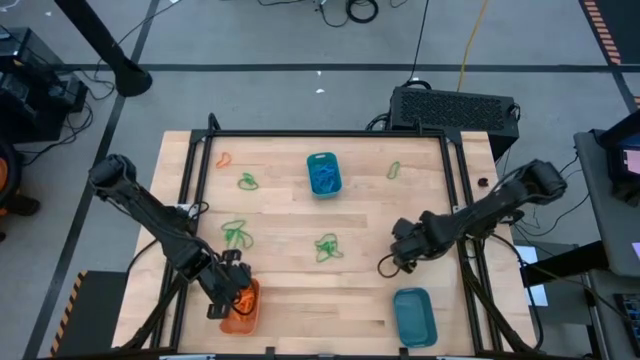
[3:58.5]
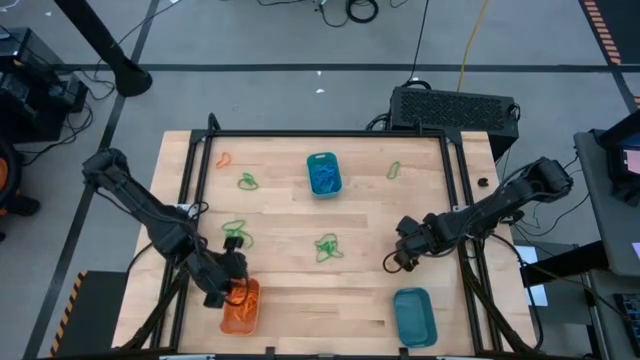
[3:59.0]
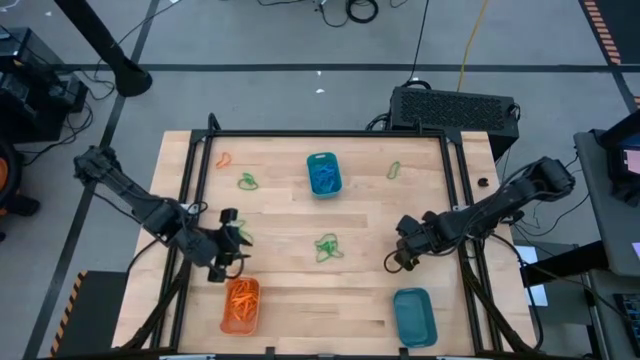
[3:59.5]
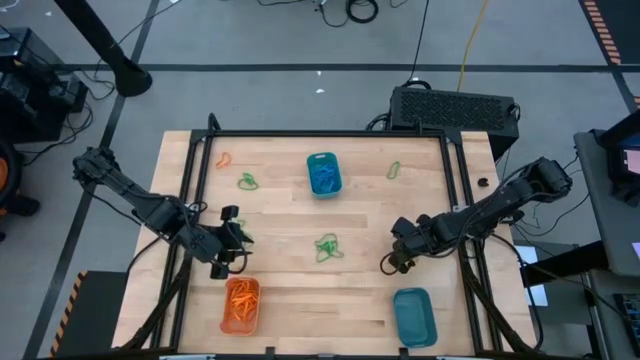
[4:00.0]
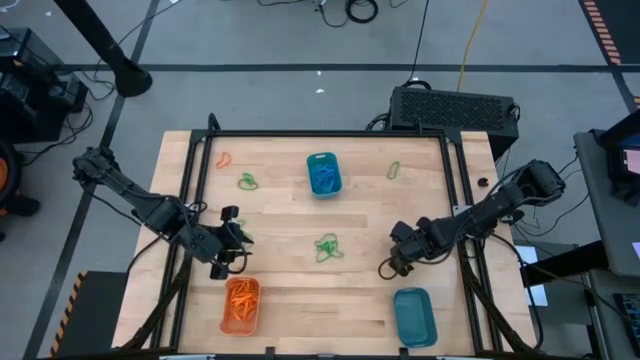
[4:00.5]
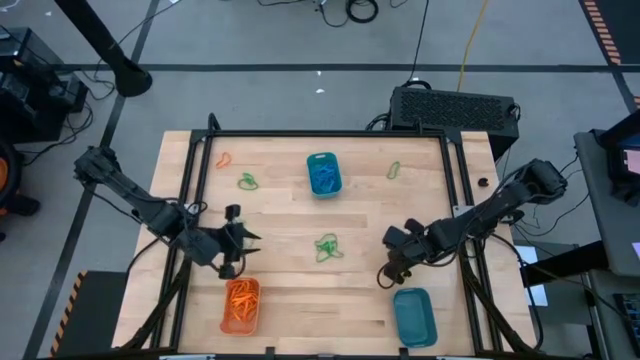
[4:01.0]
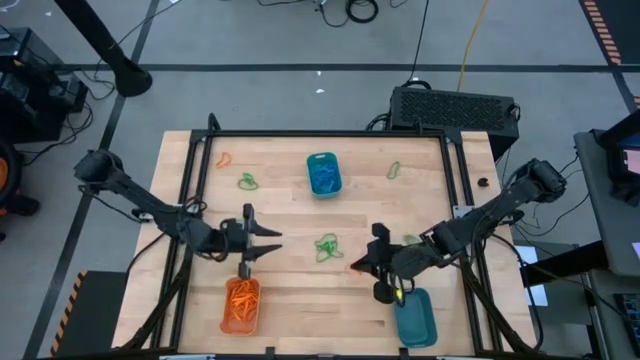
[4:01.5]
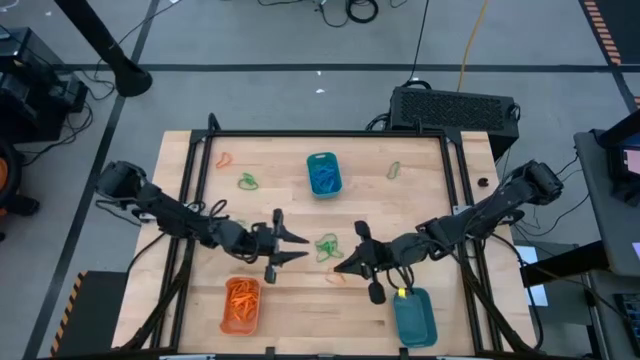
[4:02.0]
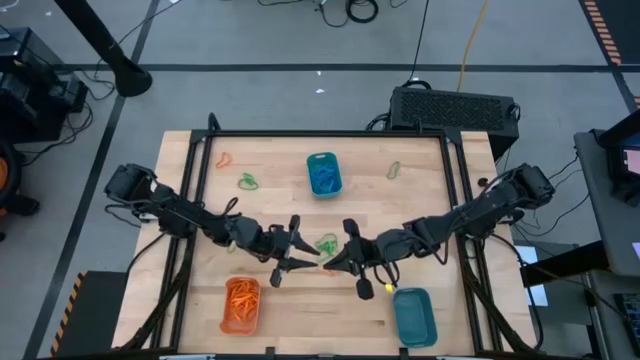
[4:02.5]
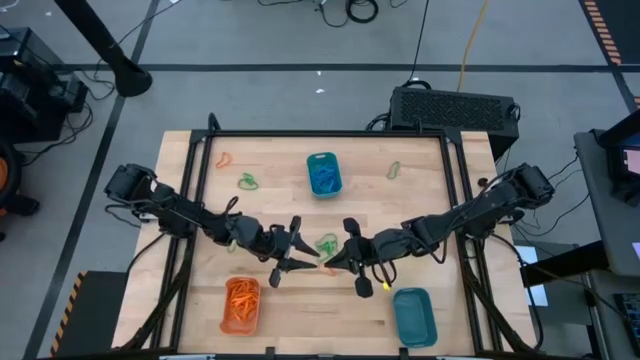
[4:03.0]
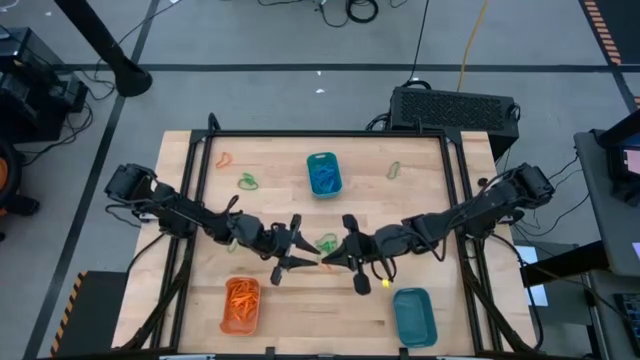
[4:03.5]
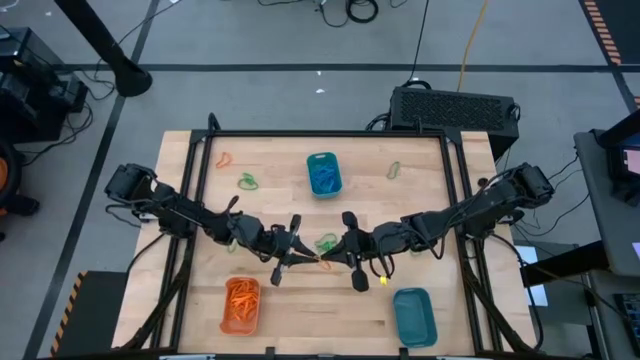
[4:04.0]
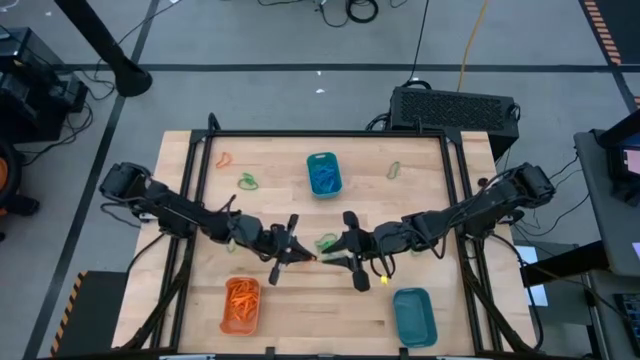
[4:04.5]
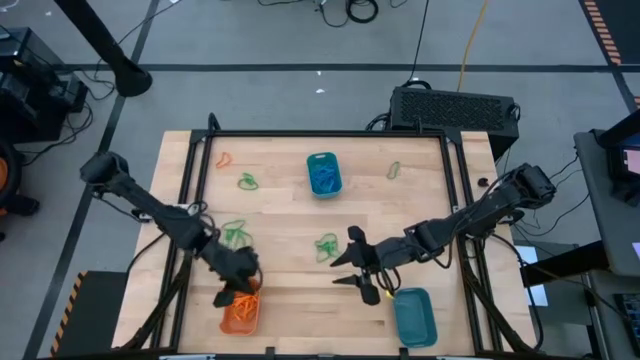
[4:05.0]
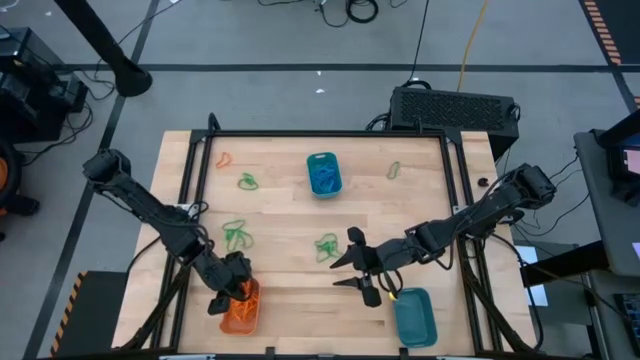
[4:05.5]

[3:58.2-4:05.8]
Task: Sort rubber bands into baskets
Put the orange rubber band into the orange bin

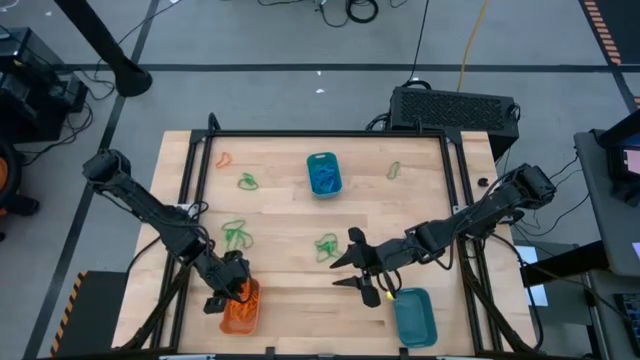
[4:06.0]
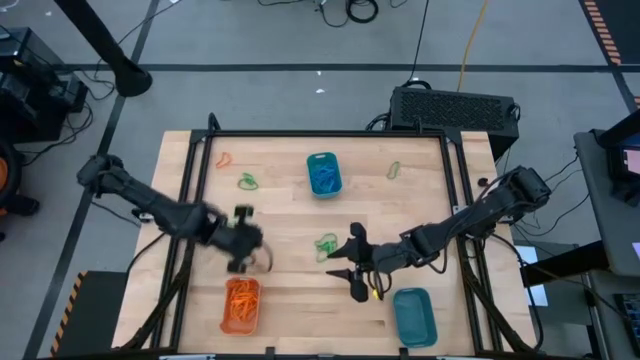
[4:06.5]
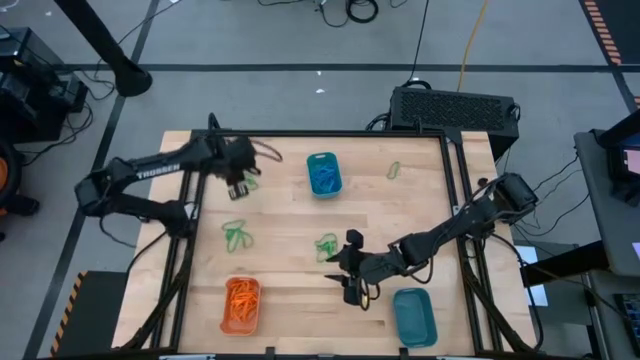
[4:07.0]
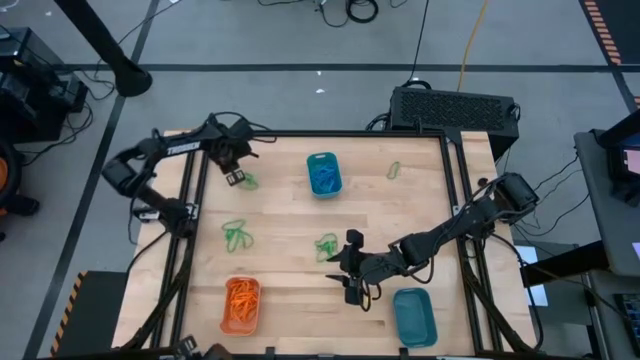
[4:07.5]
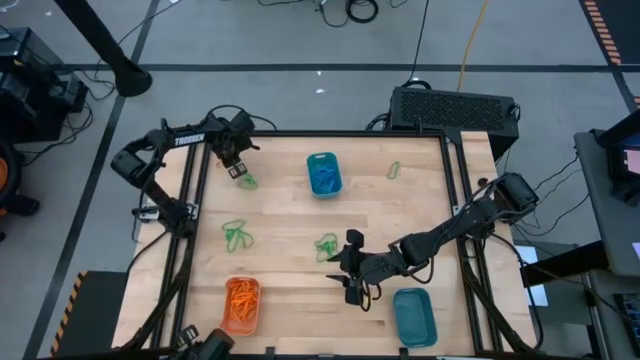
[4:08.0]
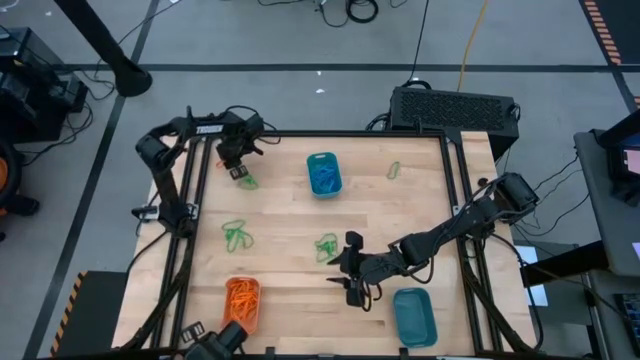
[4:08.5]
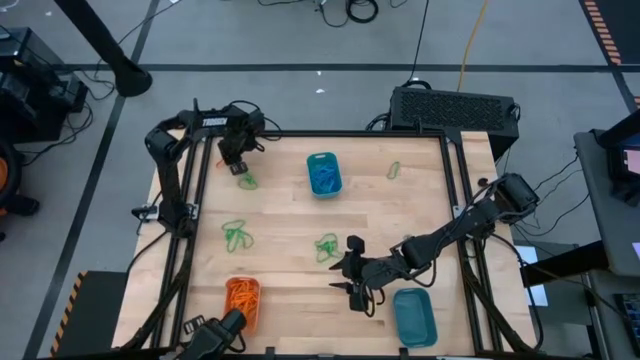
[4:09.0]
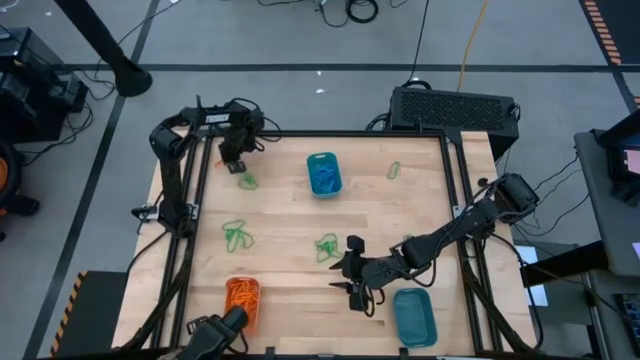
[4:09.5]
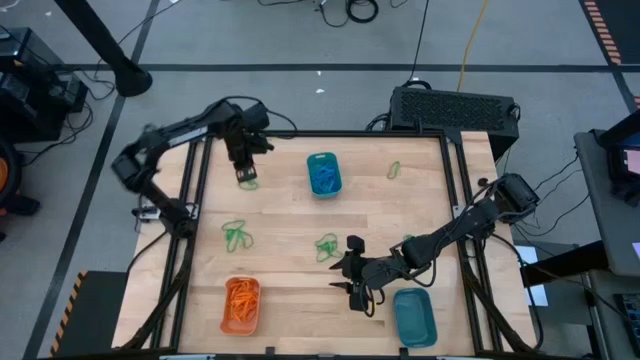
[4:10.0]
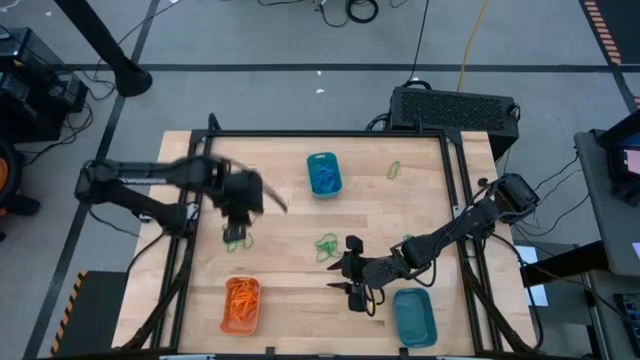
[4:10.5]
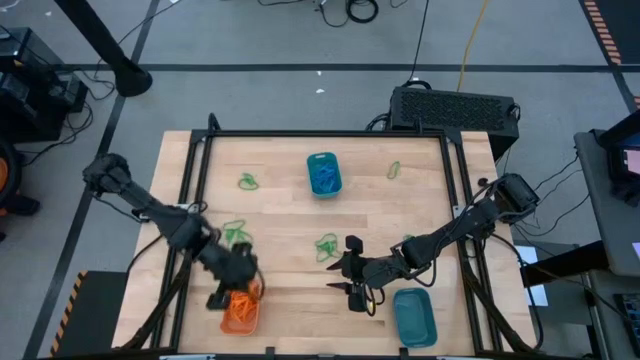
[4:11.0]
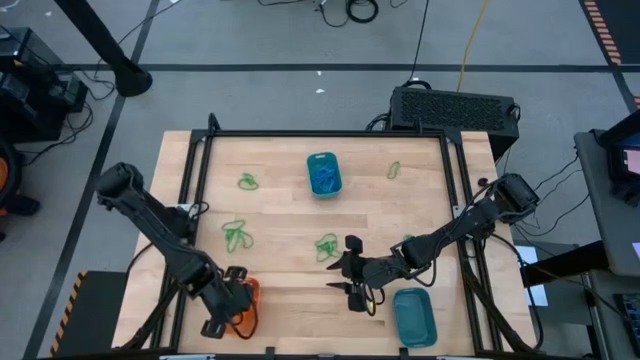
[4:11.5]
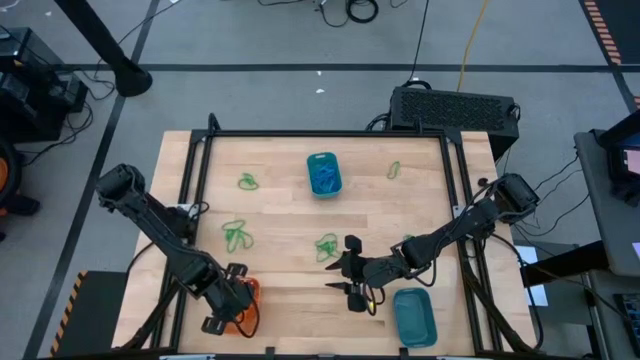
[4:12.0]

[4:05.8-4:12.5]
Put the orange rubber band into the orange bin

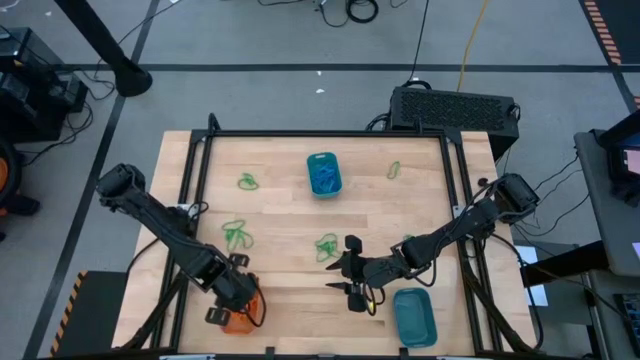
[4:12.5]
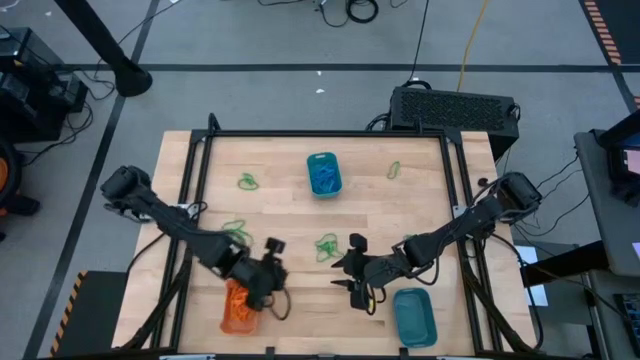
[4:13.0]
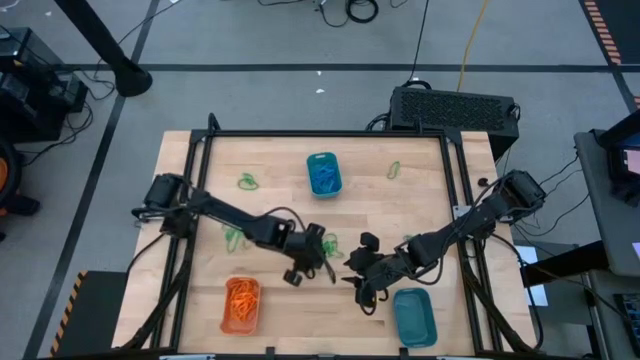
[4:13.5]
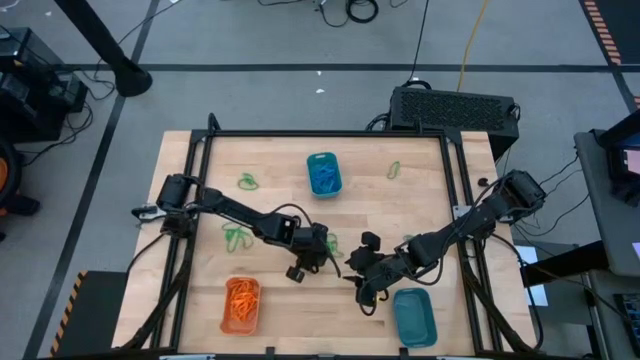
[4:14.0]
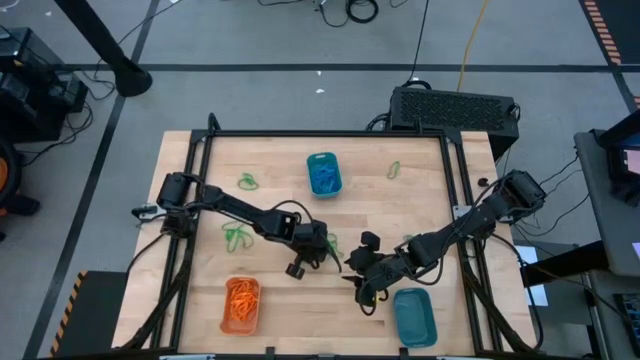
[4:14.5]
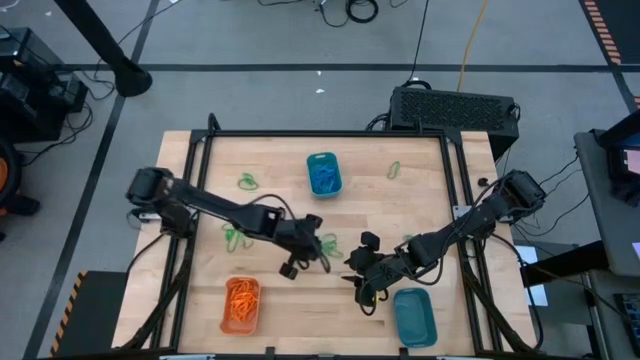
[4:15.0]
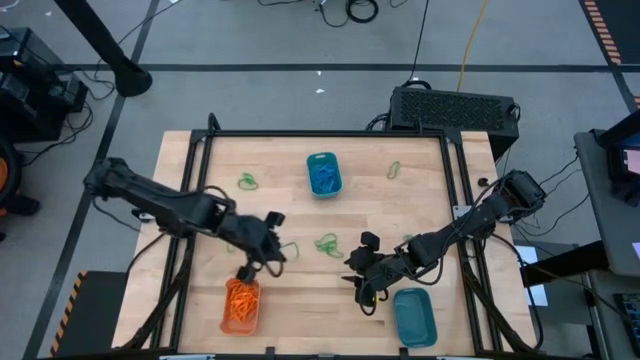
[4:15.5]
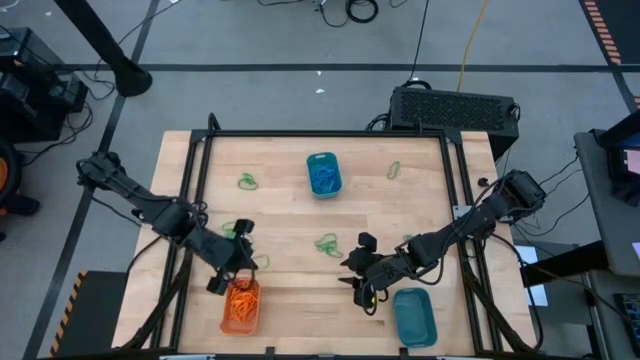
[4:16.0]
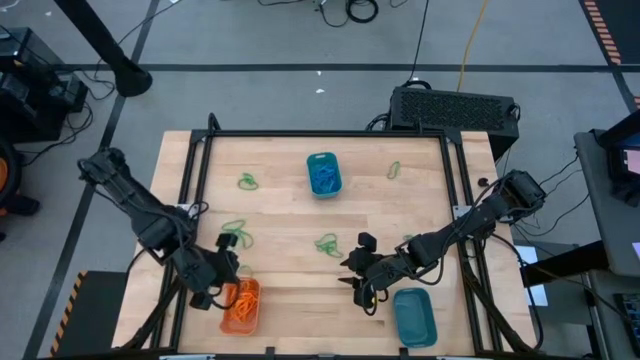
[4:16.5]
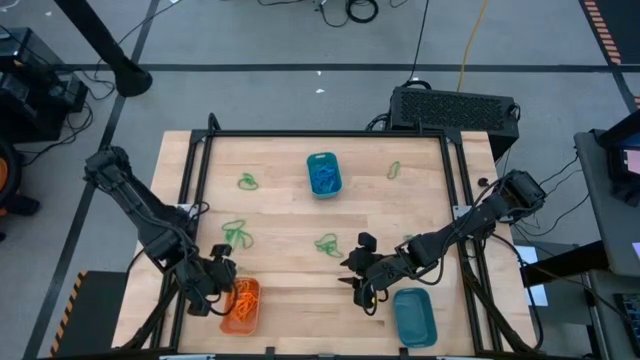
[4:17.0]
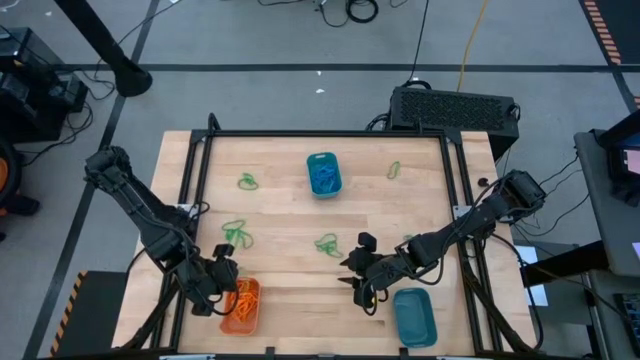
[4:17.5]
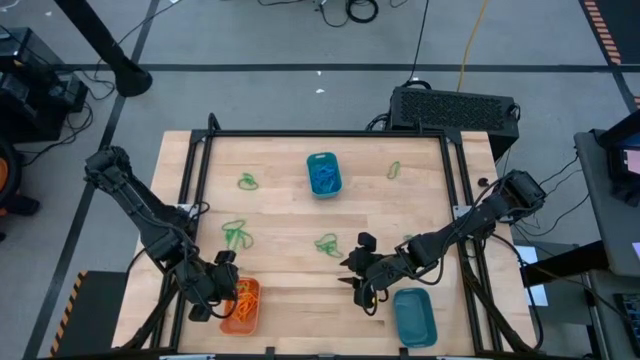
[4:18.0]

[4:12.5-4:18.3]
Put the green rubber band into the bottom bin
